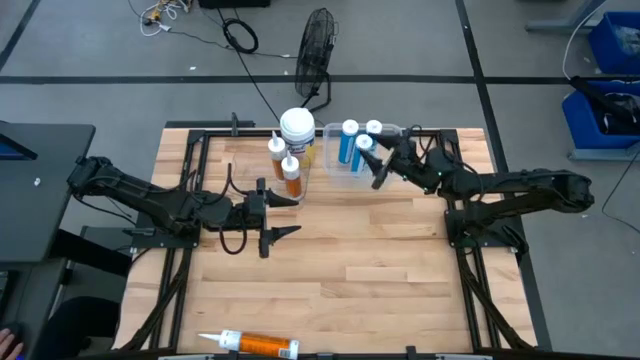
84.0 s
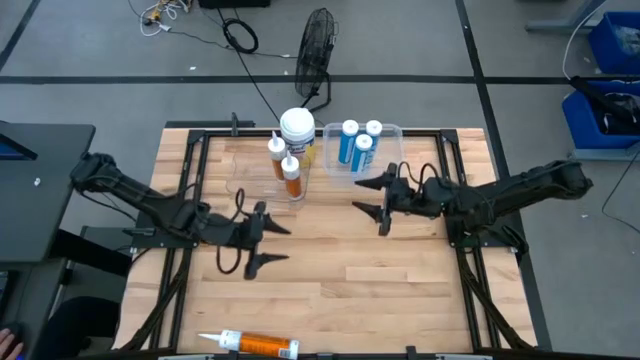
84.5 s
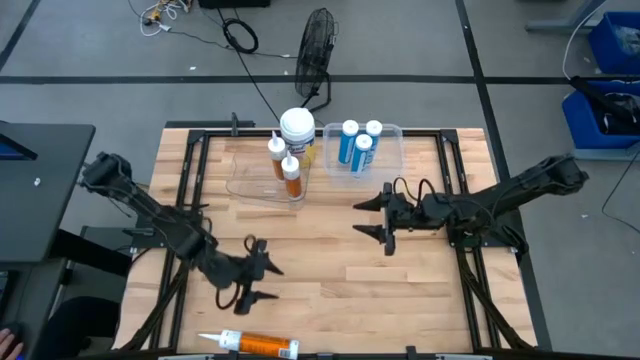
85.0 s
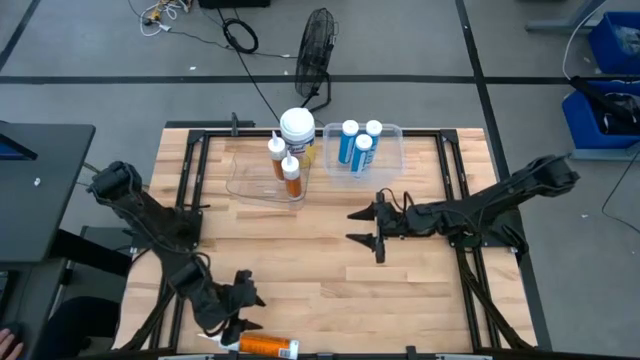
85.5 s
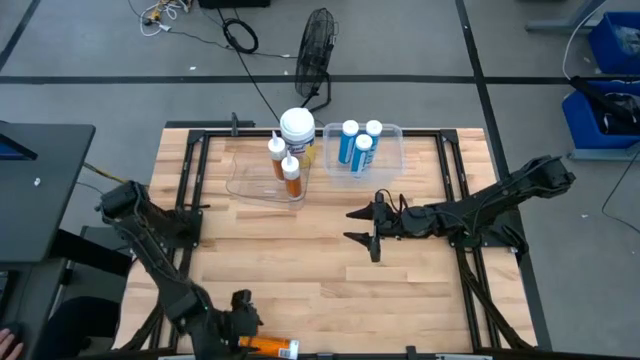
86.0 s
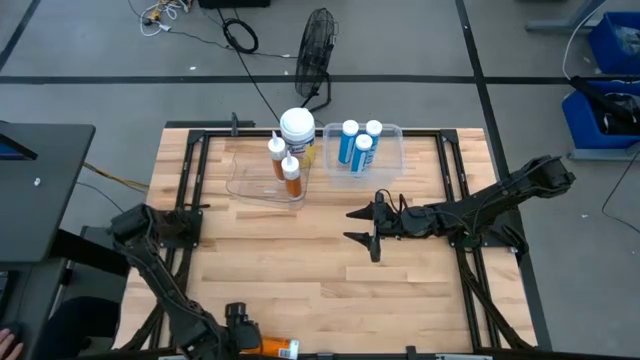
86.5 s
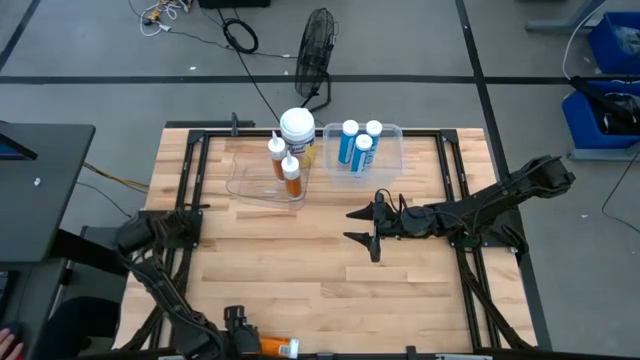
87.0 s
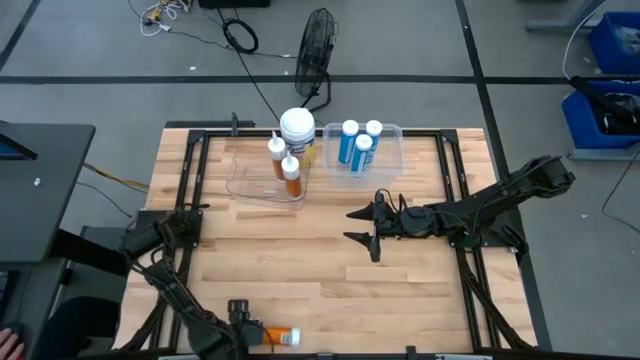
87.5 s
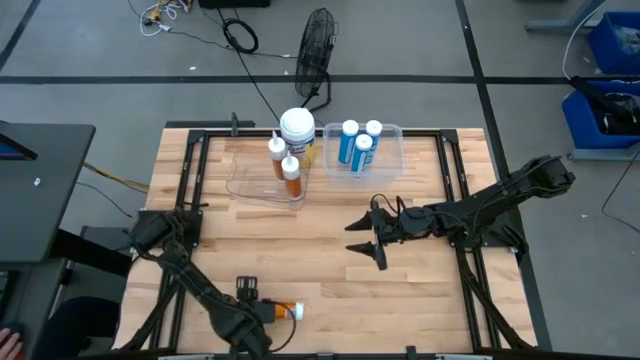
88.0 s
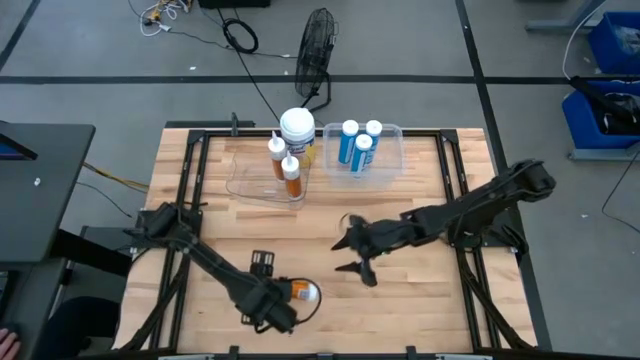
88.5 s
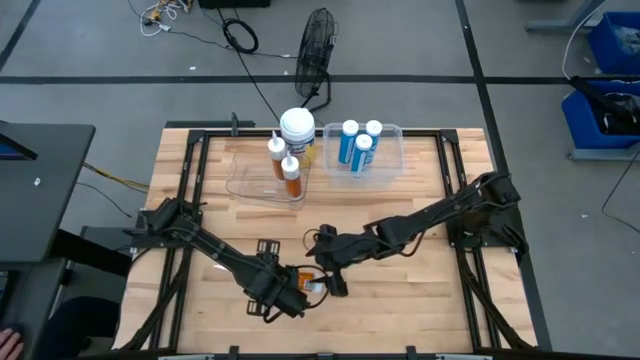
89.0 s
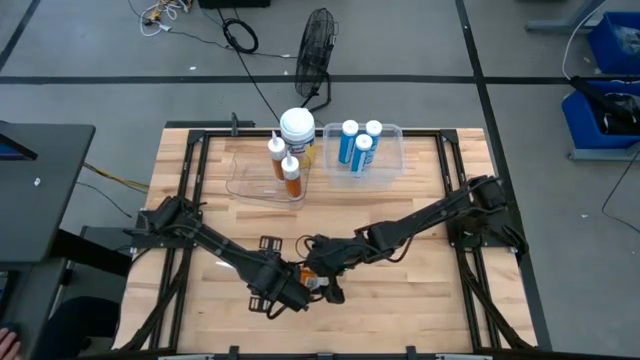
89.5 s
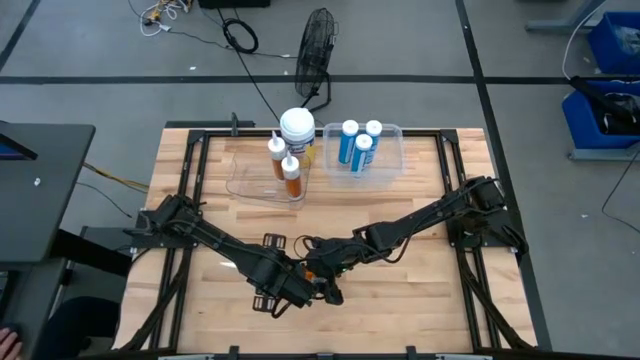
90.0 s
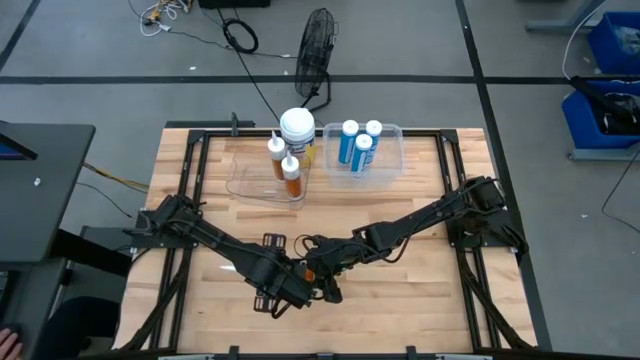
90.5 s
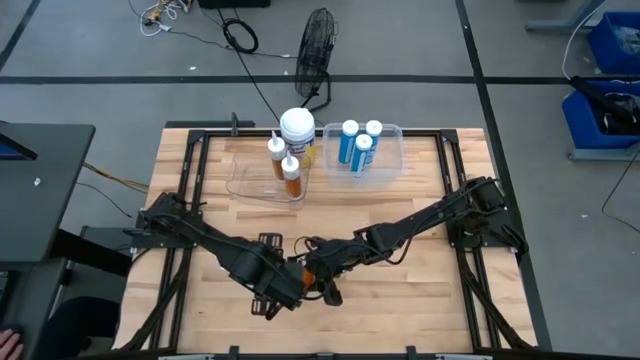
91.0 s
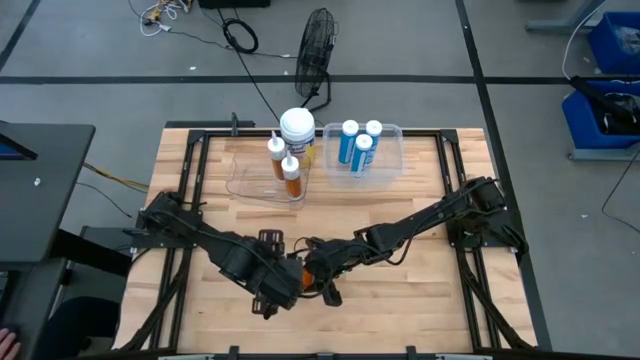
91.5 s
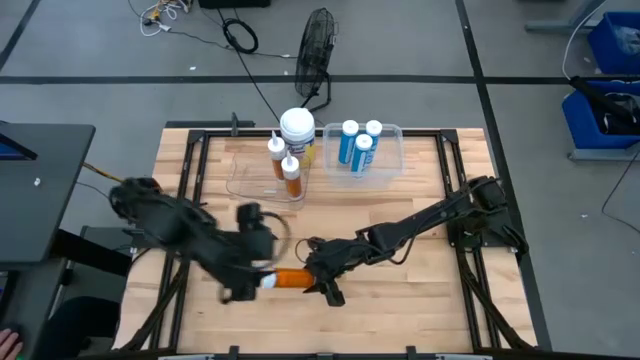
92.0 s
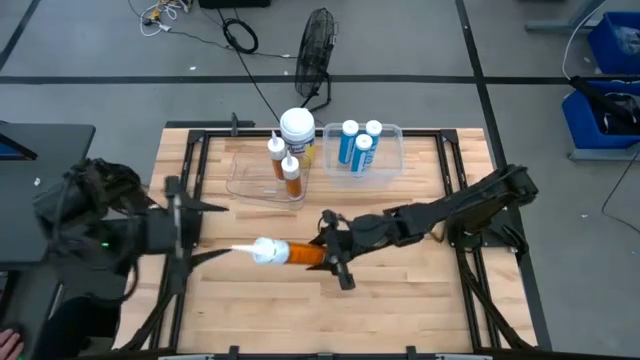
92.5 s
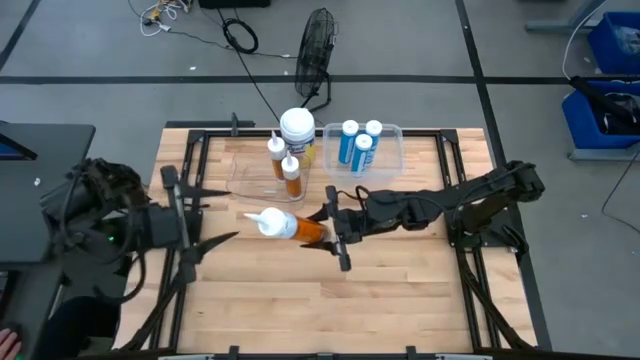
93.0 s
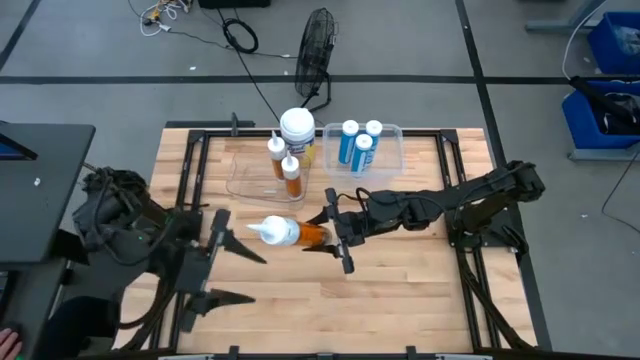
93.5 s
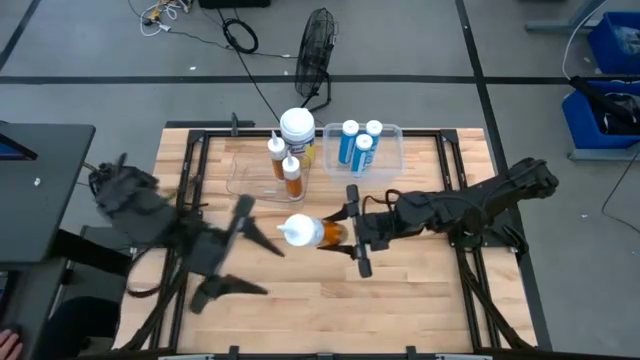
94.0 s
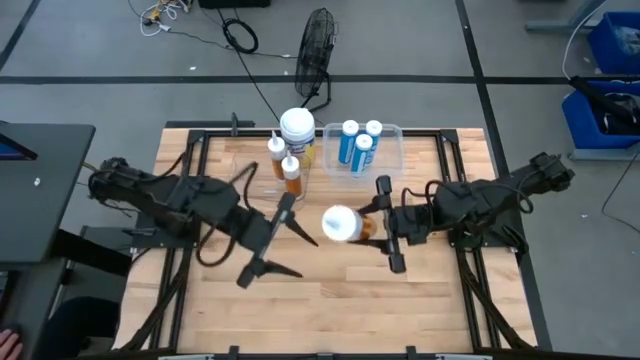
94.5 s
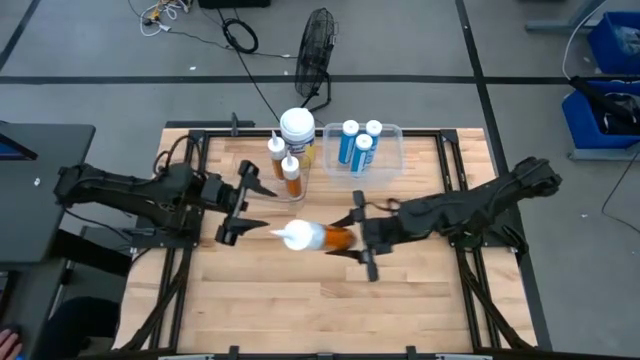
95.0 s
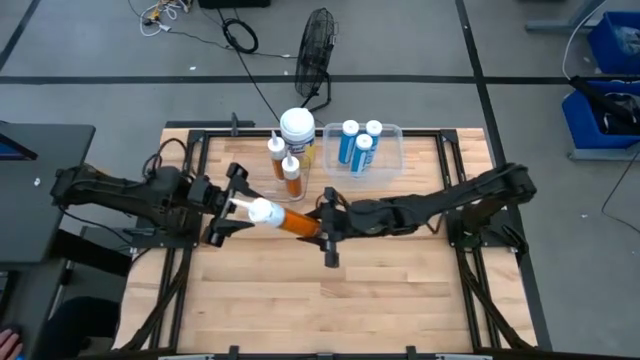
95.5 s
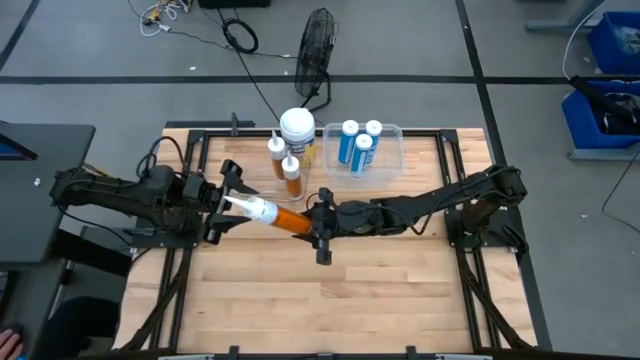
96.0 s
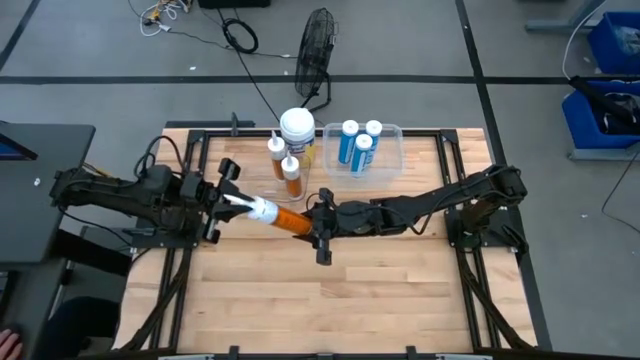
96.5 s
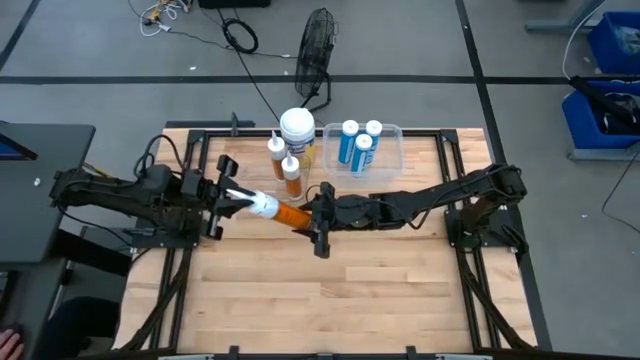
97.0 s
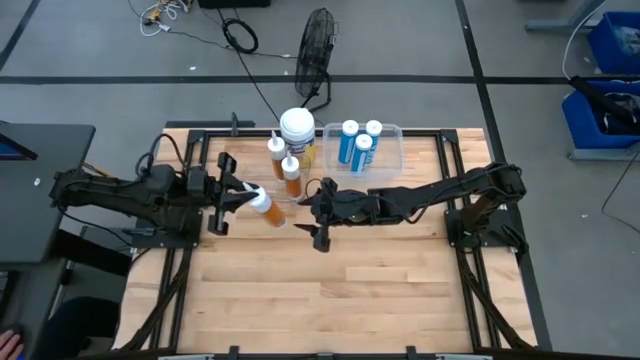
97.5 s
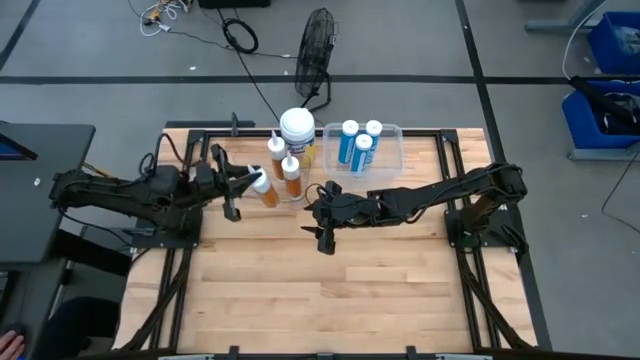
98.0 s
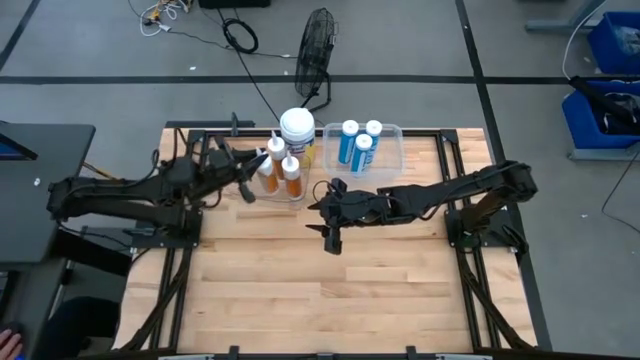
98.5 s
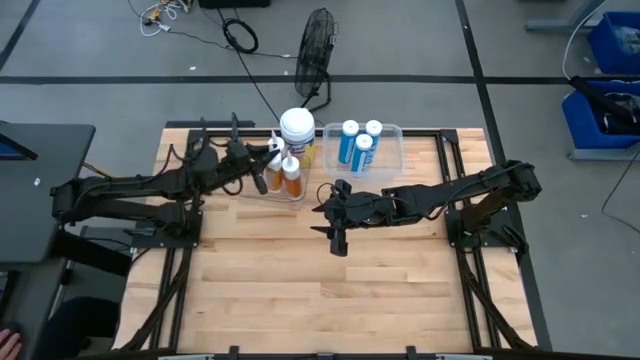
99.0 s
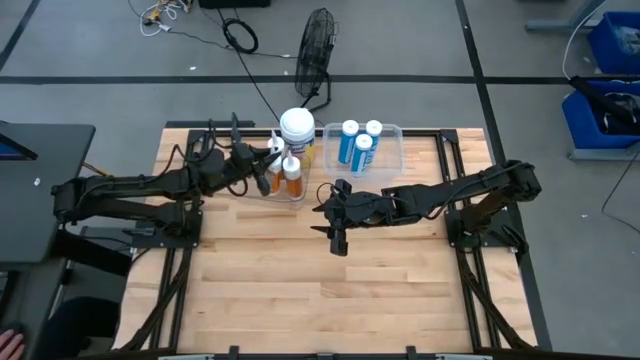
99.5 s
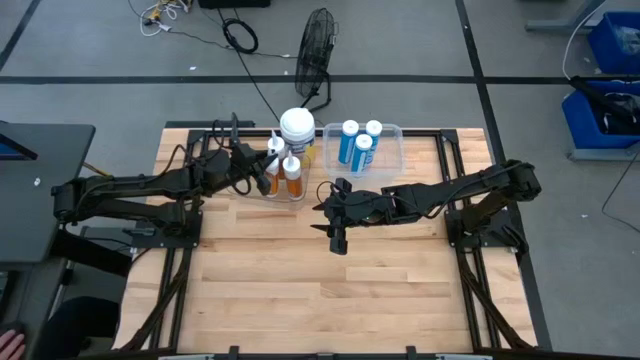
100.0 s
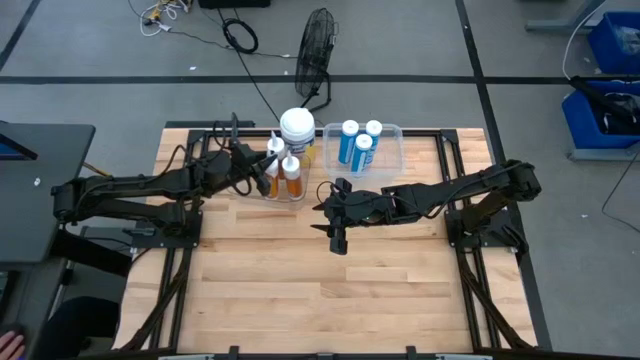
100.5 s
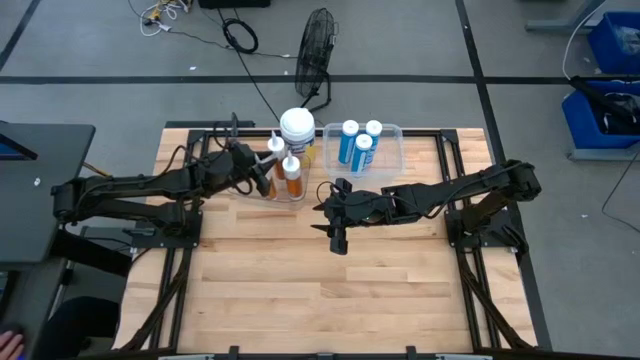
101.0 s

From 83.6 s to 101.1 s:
Task: Pick & place silicon tubes, Sealant and Lysol wipes
Put the orange sealant into the left transparent bin

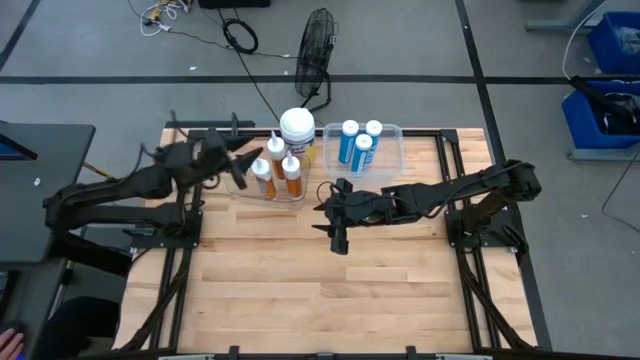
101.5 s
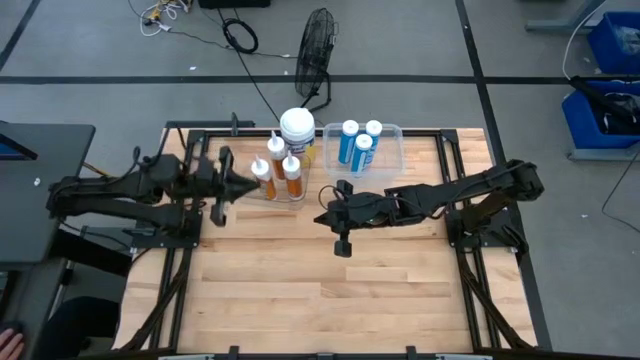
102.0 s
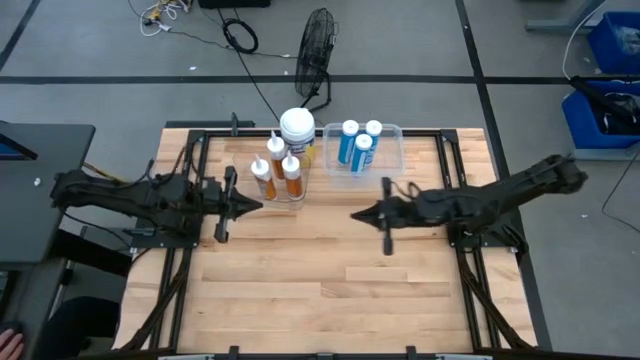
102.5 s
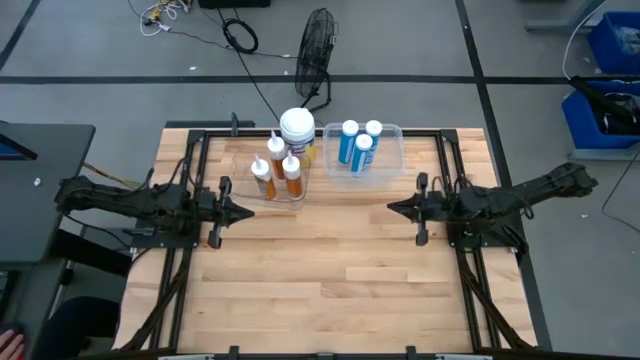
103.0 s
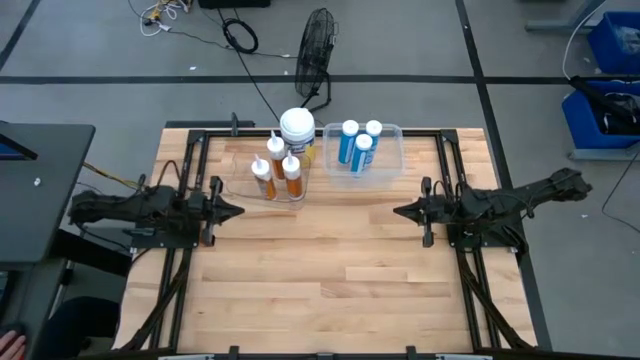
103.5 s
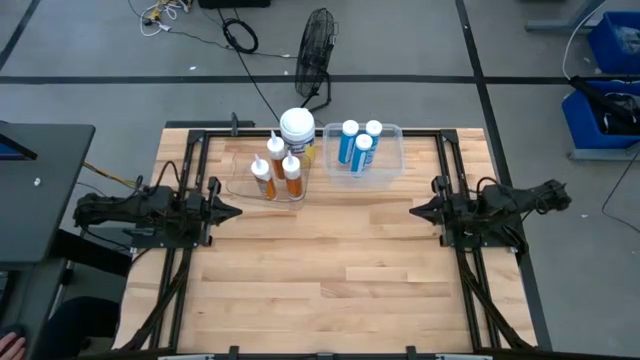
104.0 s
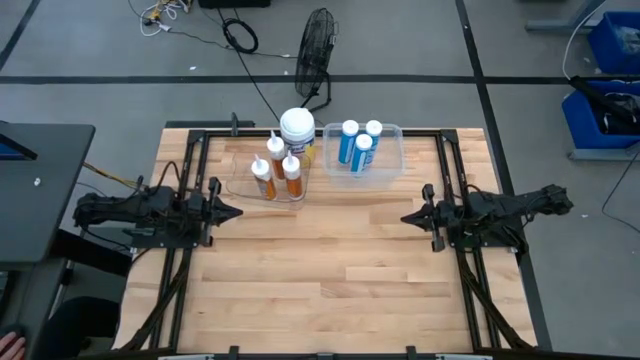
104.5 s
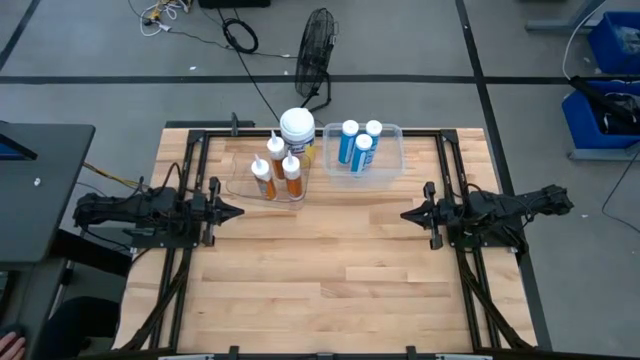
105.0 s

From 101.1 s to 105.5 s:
Return to Home Position
